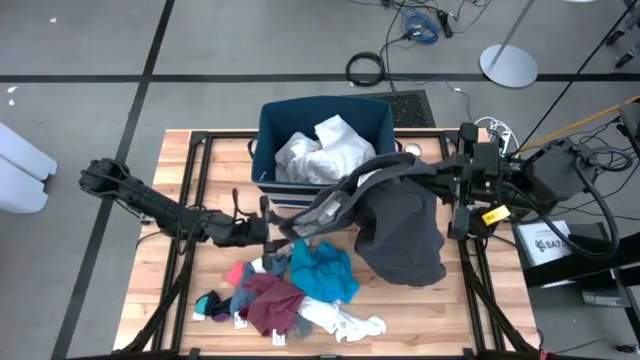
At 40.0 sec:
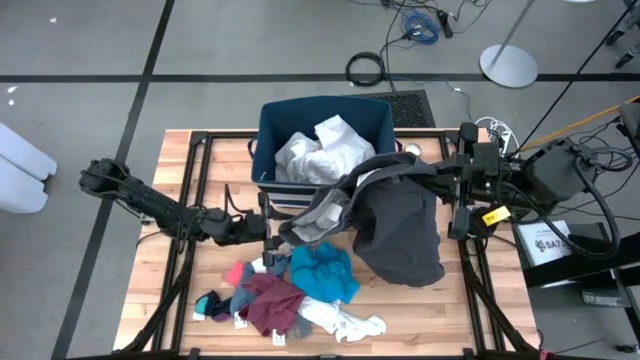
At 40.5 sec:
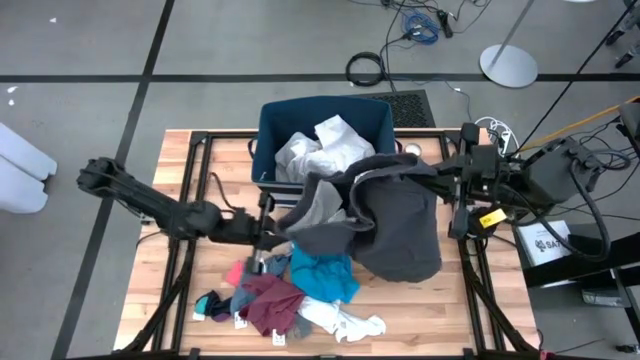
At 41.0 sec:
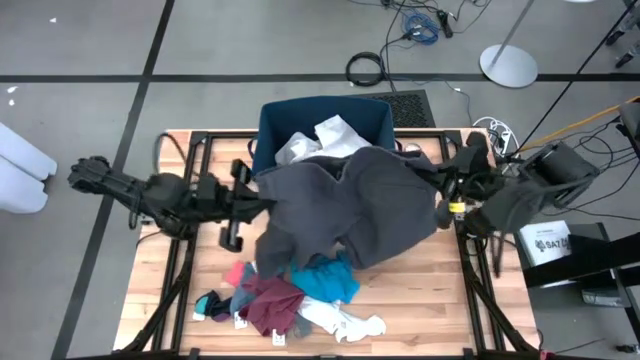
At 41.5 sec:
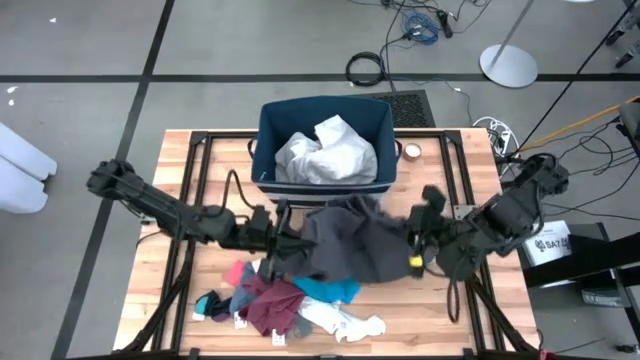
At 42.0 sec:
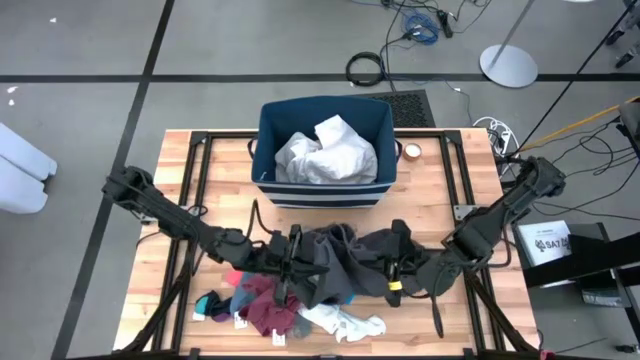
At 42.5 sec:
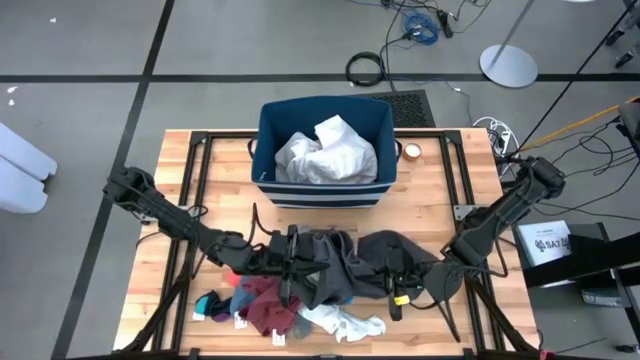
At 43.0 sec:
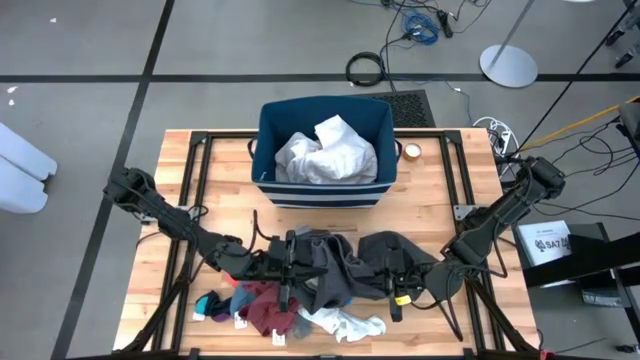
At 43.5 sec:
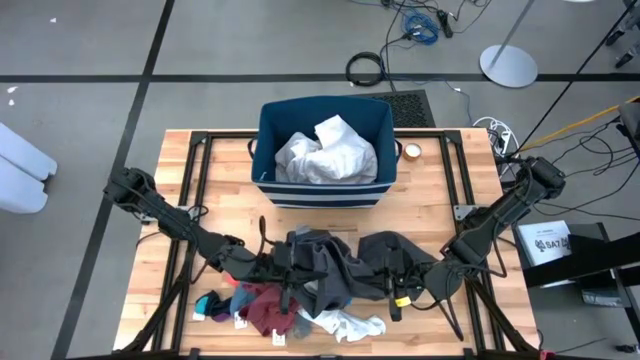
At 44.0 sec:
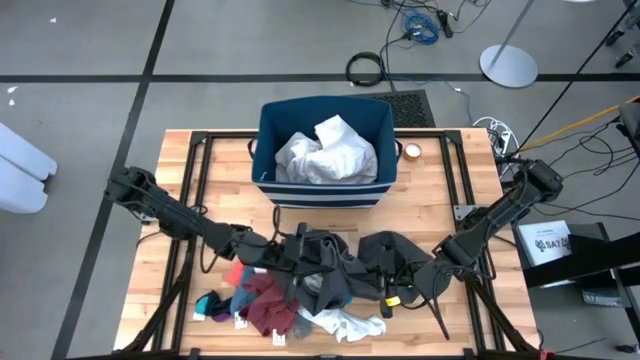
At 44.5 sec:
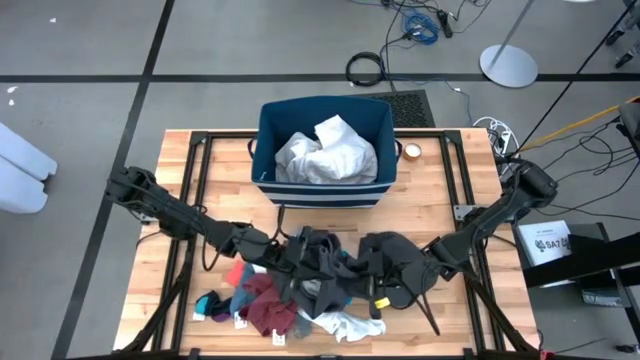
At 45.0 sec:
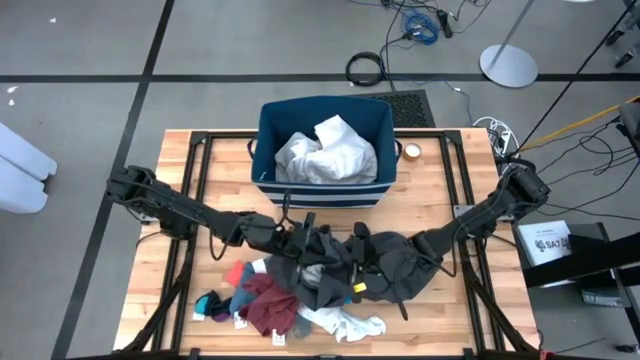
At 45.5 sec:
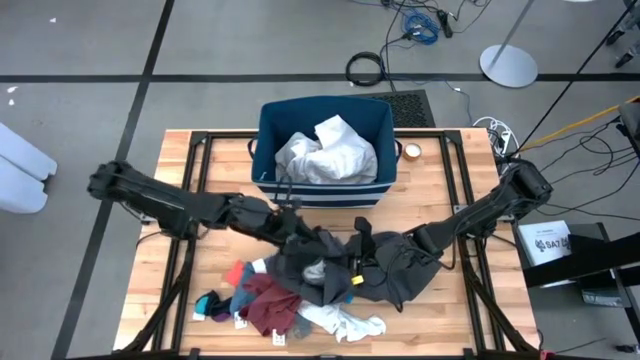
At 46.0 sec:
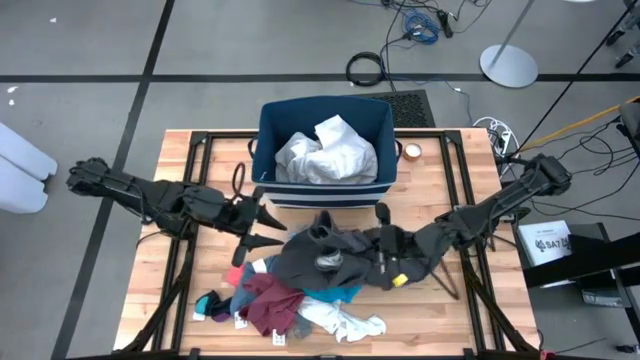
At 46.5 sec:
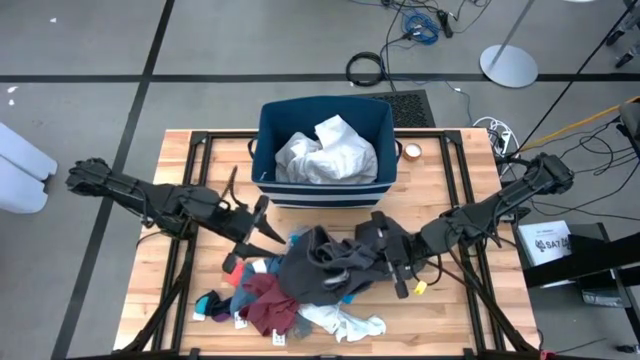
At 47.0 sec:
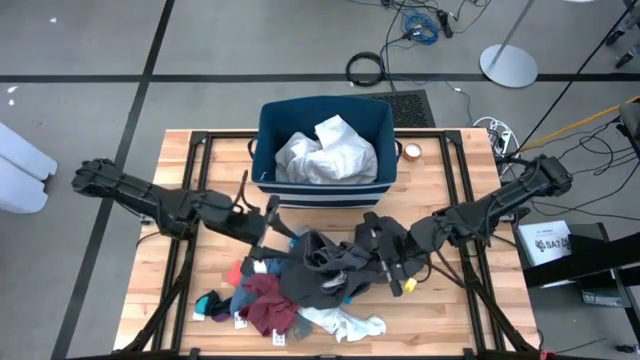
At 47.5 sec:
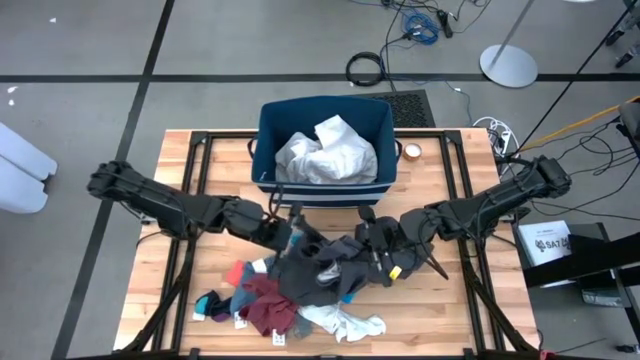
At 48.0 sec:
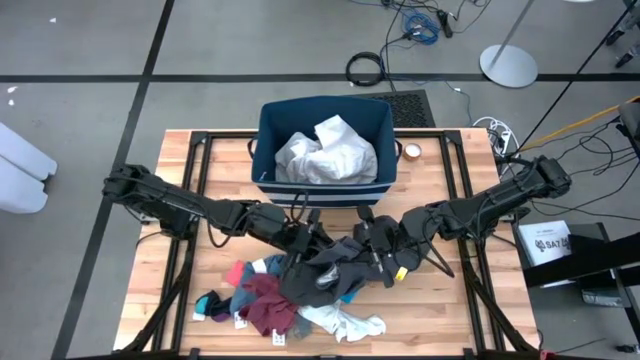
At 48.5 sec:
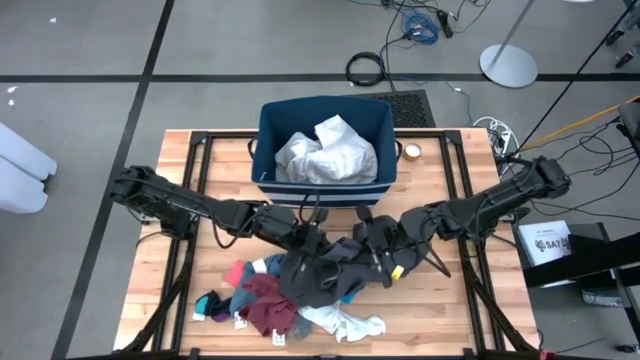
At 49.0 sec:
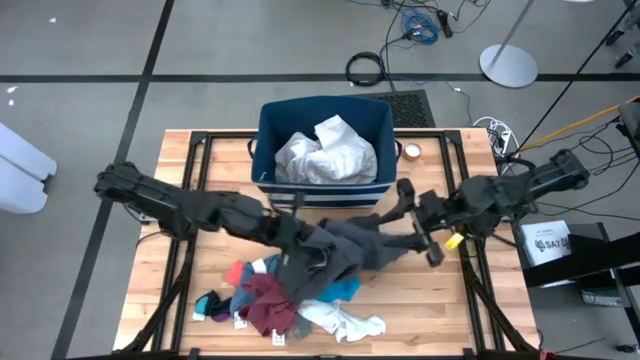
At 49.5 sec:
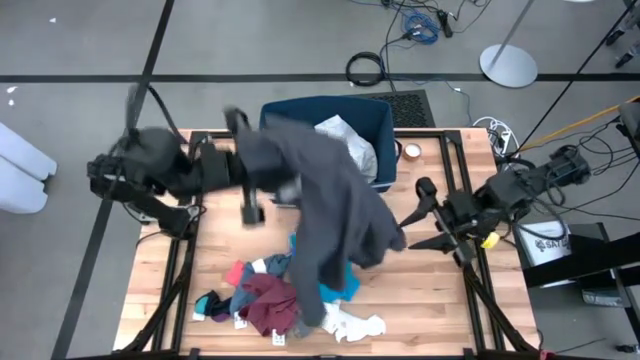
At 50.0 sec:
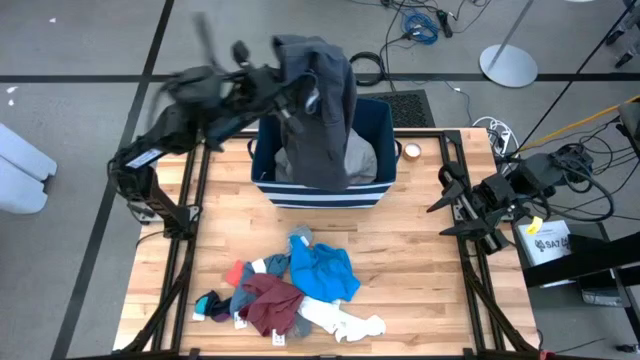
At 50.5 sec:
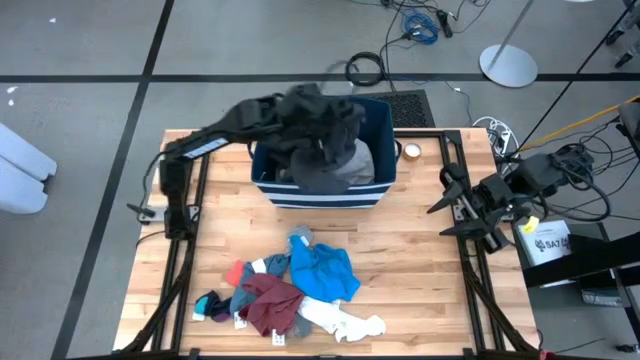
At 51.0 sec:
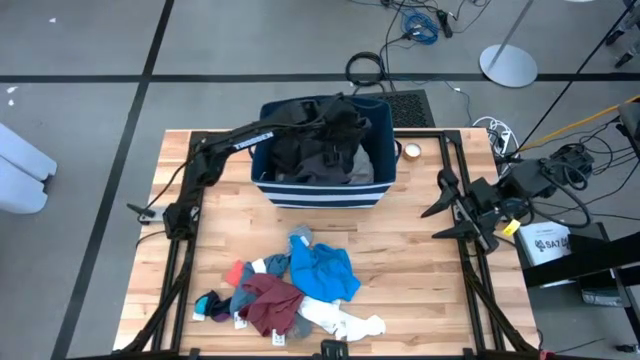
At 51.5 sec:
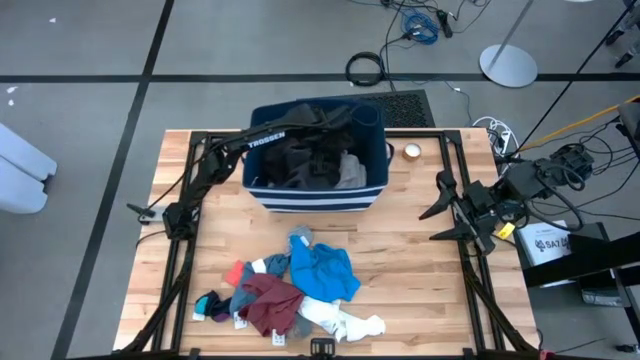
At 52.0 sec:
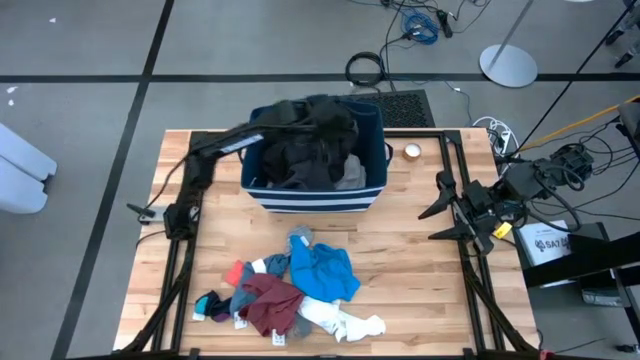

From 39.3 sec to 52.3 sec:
Task: Sort clothes
Put the dark gray shorts into the blue bin

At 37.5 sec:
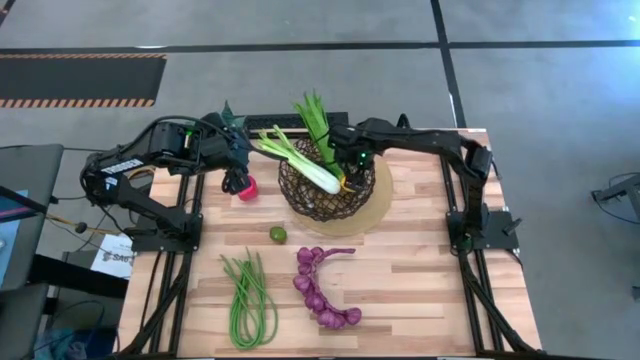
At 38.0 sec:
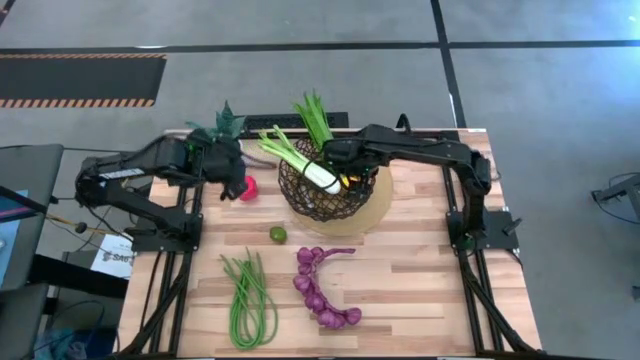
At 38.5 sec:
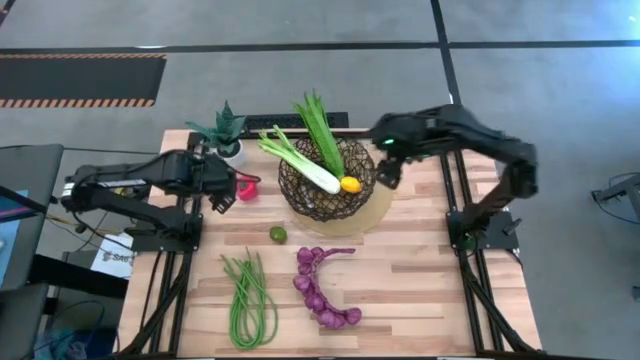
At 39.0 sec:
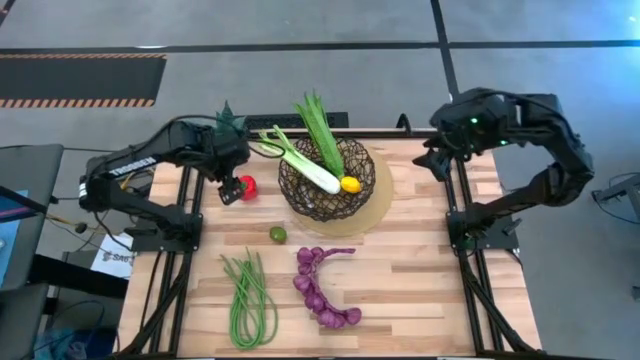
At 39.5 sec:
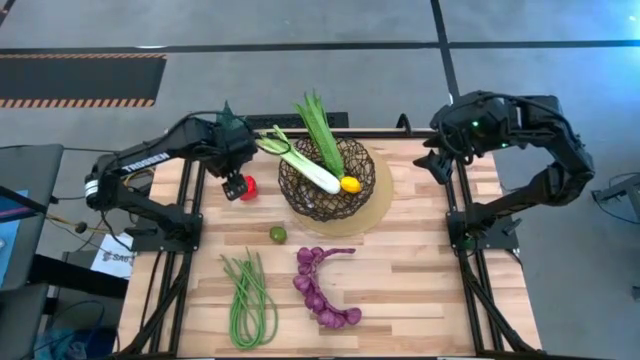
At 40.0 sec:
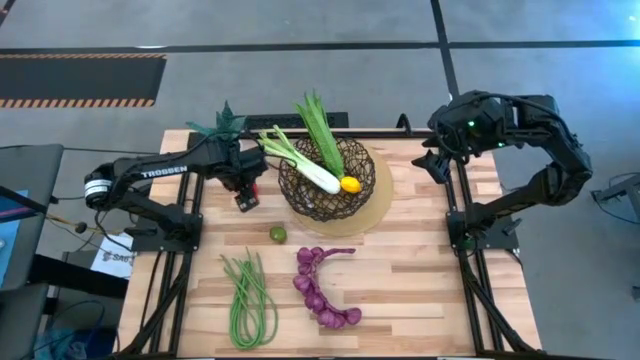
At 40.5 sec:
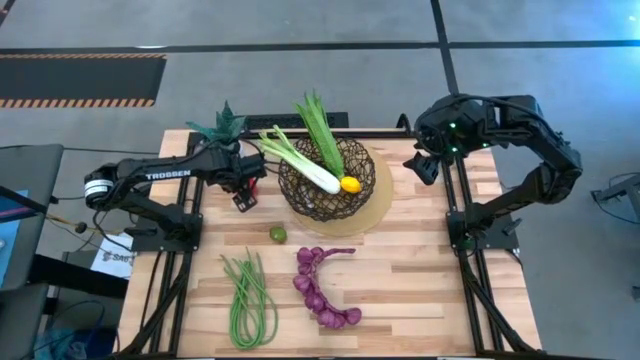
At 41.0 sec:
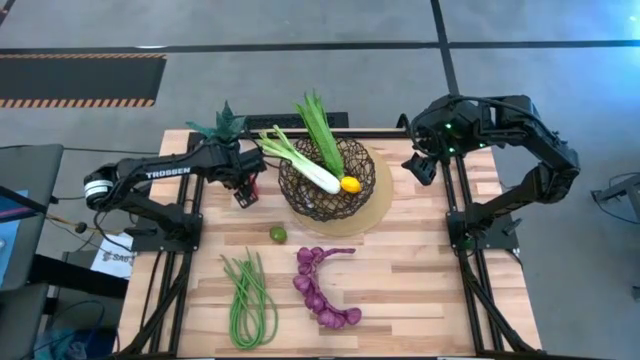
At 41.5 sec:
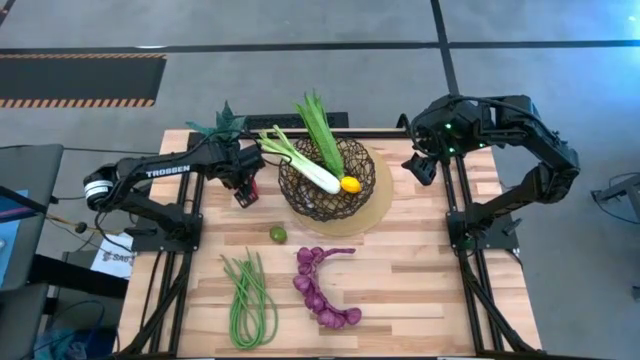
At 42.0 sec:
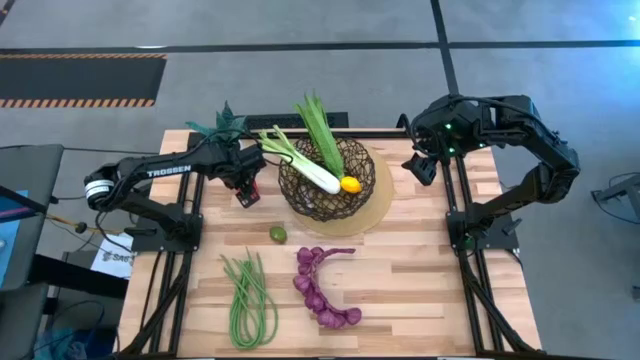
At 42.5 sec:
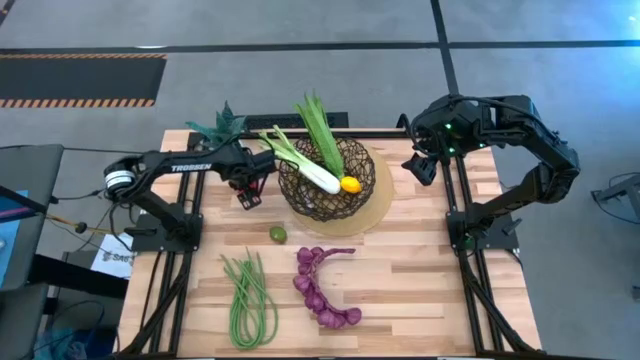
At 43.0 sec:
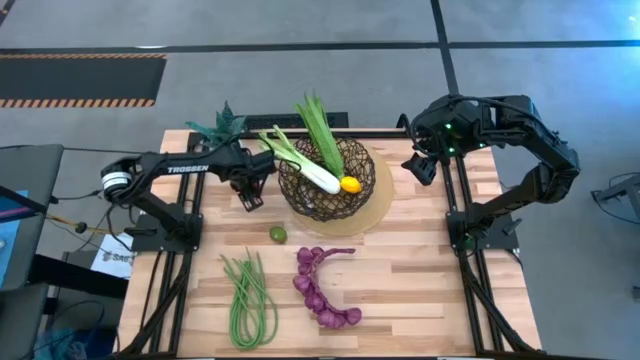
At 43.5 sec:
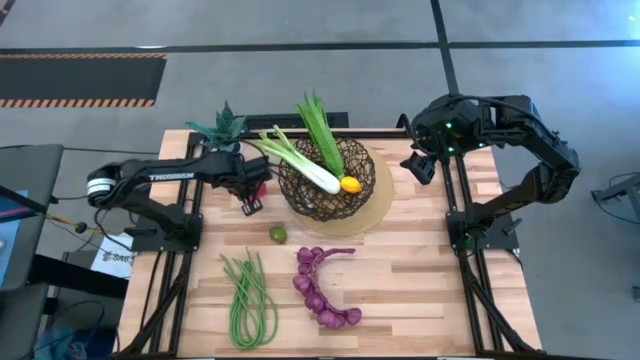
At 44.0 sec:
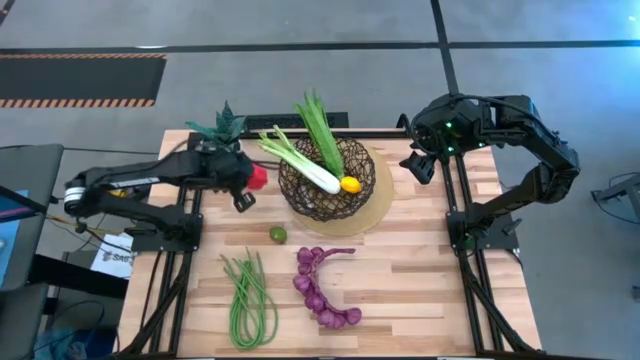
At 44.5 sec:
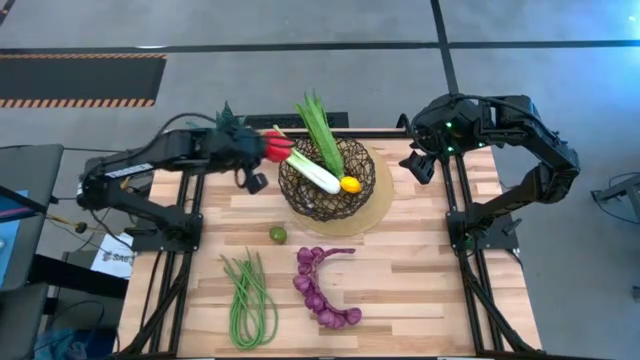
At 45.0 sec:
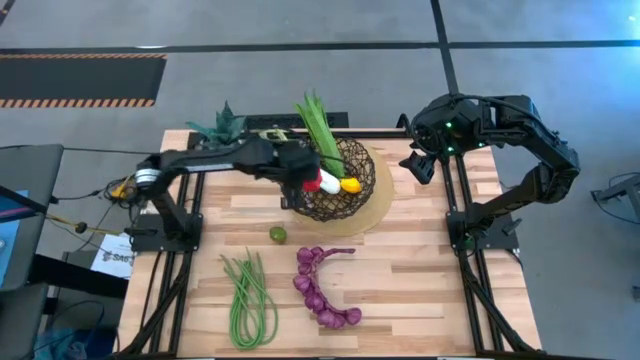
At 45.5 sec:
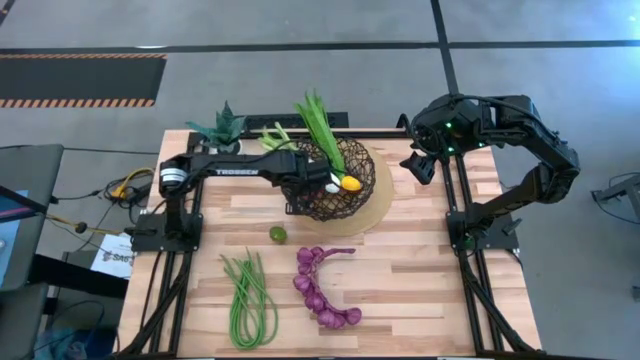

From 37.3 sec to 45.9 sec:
Task: Build produce basket
Put the bell pepper into the basket
